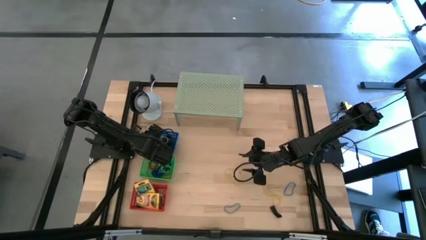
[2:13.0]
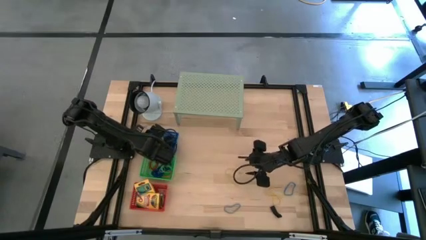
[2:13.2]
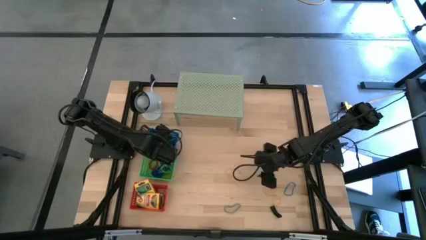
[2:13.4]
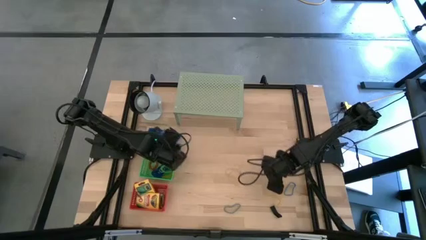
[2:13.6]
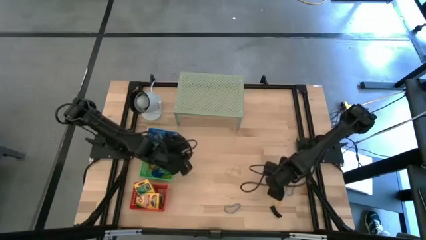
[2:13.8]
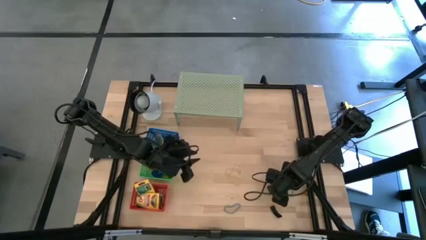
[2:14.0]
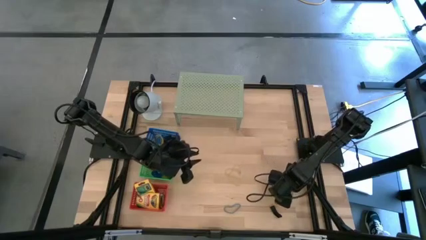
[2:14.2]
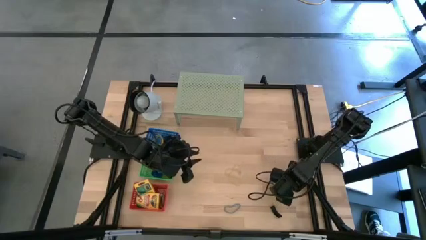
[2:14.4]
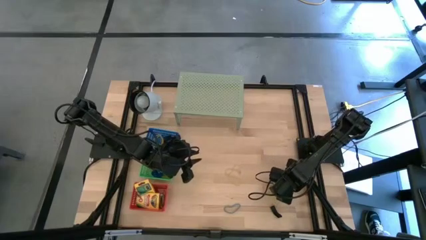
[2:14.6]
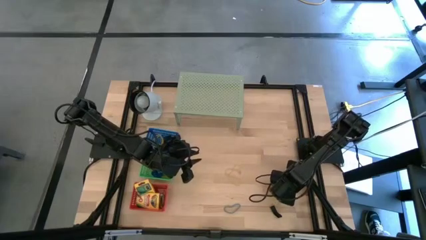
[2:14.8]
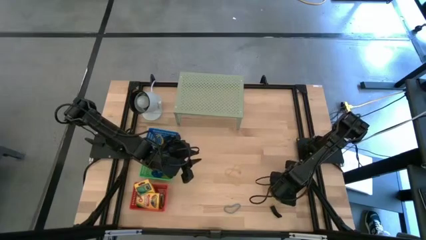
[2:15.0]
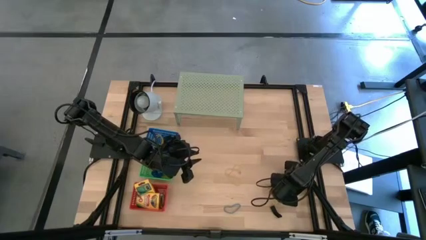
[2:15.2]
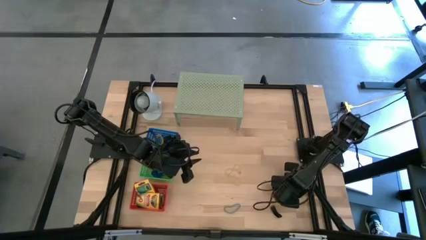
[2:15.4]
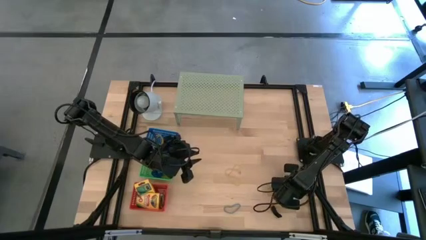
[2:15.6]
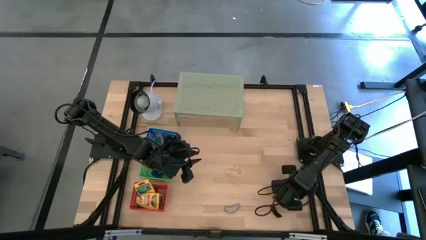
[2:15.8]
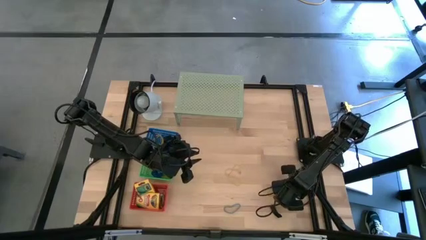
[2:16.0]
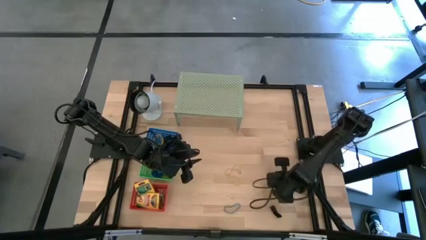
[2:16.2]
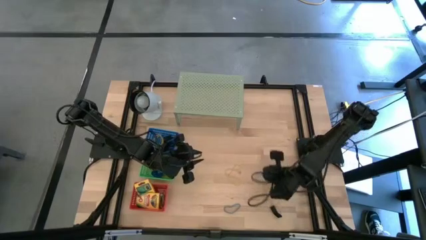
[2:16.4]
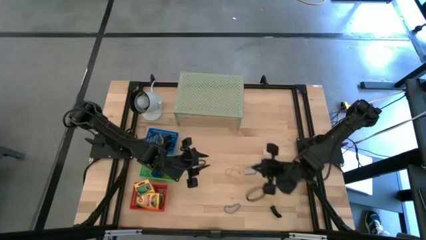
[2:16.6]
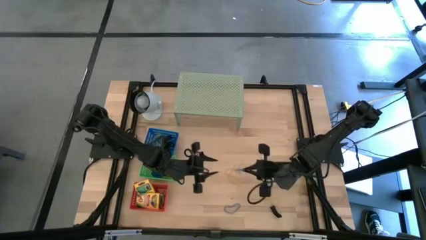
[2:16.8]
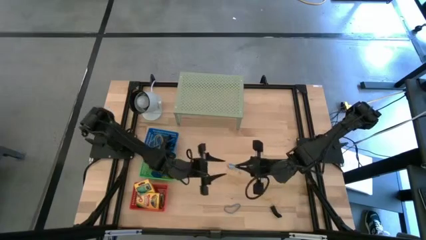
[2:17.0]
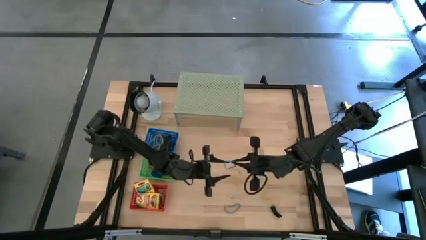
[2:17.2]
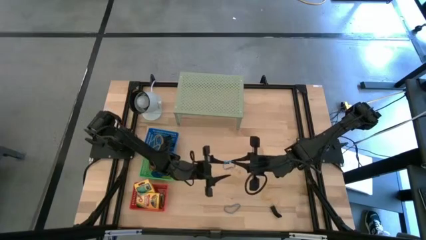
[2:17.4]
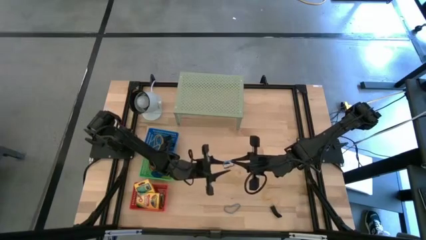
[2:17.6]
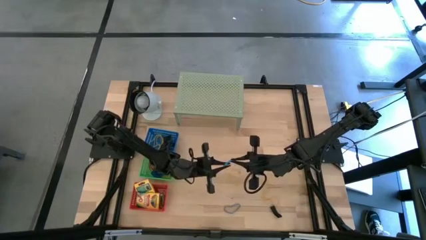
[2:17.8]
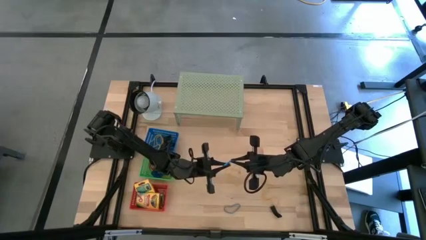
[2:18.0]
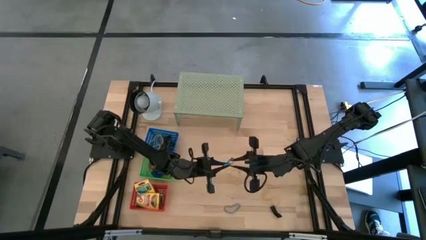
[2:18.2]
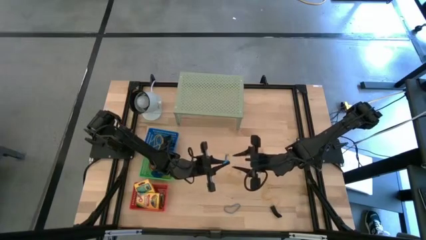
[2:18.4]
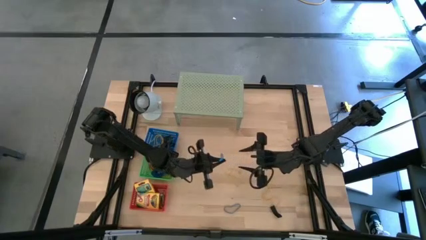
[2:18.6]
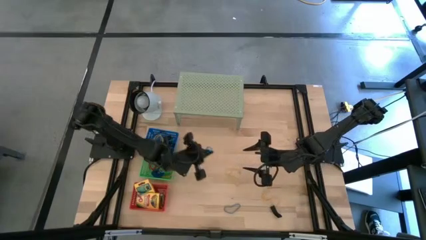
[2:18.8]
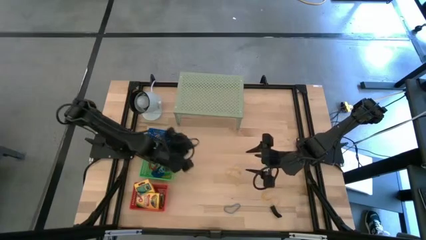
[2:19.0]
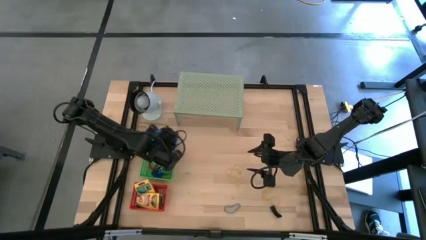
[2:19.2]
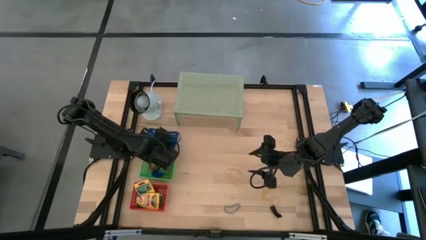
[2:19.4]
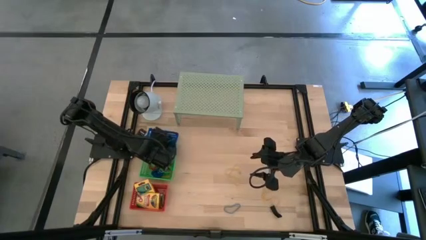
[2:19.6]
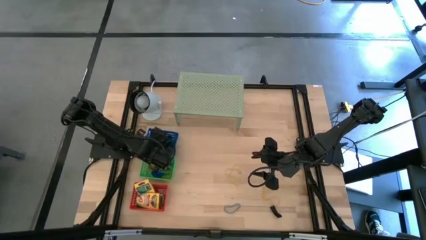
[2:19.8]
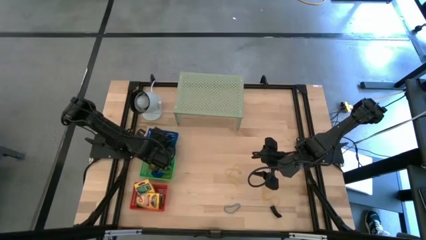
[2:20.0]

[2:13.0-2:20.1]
Task: Pick & Place Office Desk Supplies
Put the blue rubber band into the blue bin

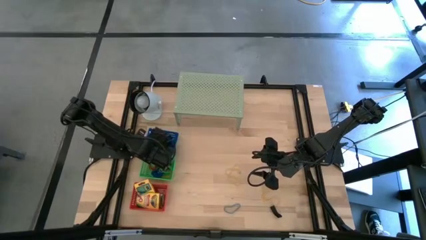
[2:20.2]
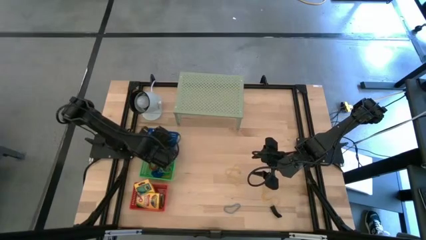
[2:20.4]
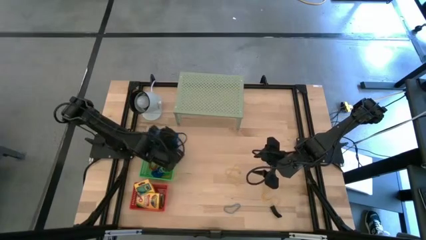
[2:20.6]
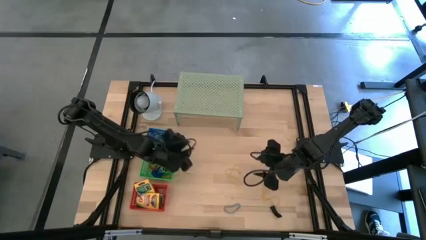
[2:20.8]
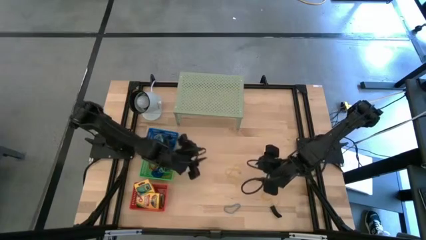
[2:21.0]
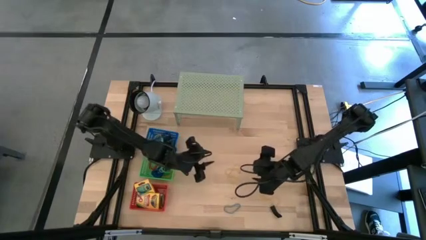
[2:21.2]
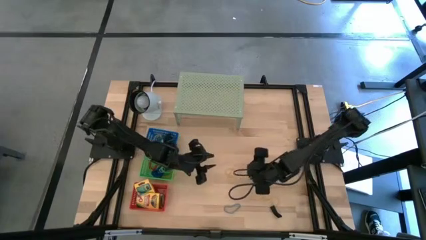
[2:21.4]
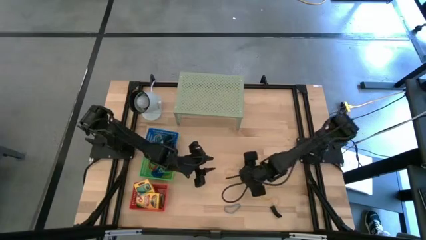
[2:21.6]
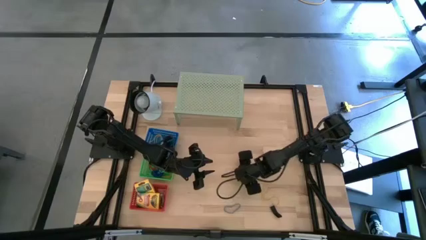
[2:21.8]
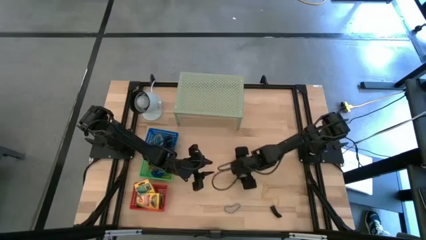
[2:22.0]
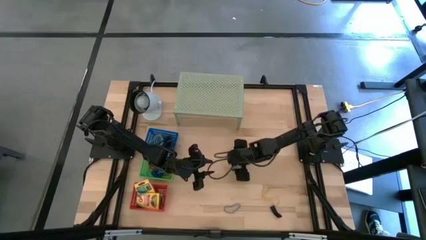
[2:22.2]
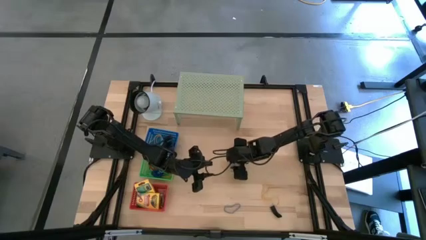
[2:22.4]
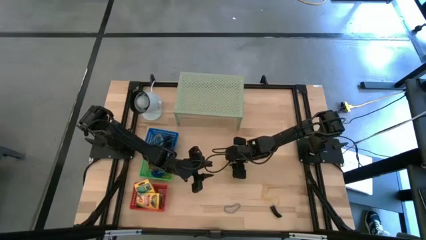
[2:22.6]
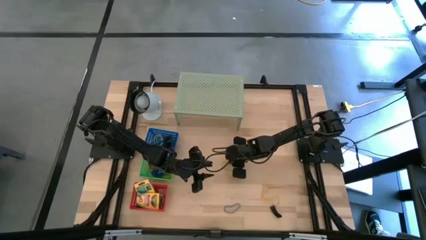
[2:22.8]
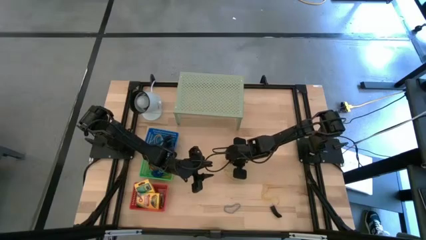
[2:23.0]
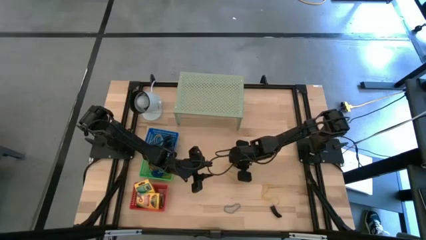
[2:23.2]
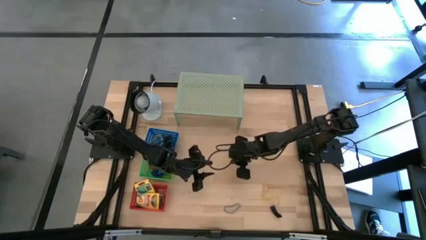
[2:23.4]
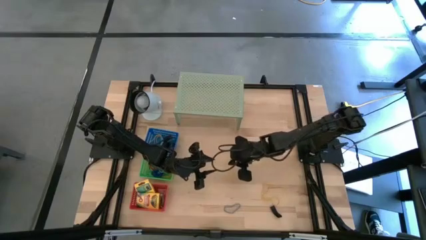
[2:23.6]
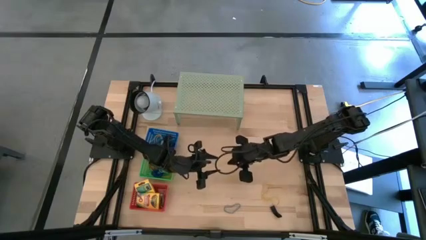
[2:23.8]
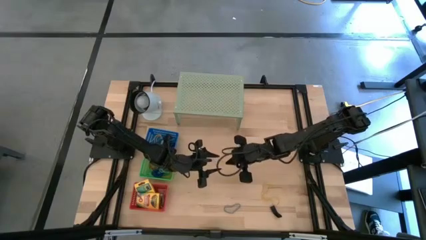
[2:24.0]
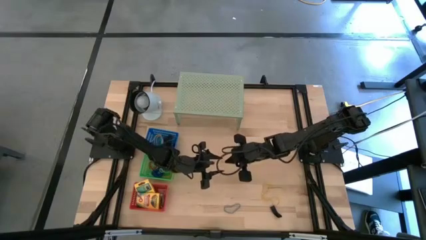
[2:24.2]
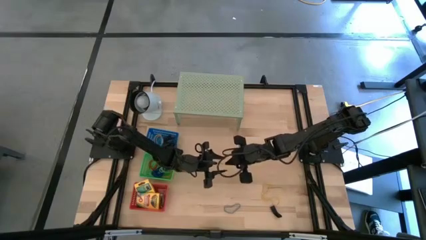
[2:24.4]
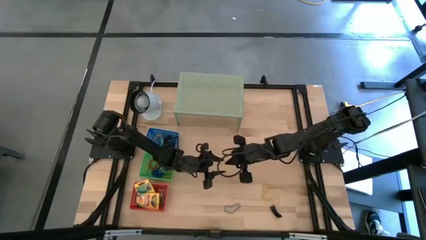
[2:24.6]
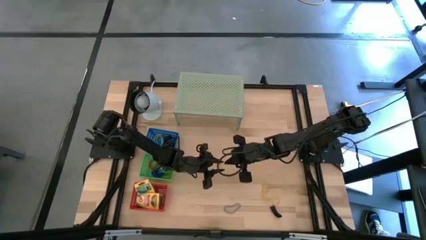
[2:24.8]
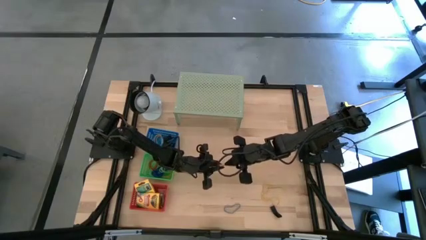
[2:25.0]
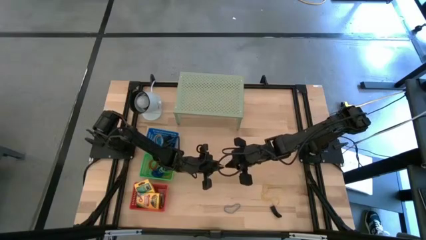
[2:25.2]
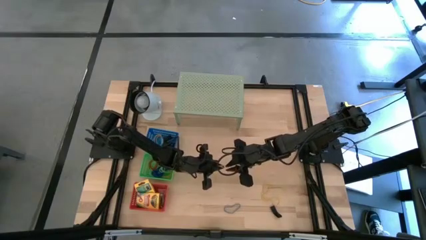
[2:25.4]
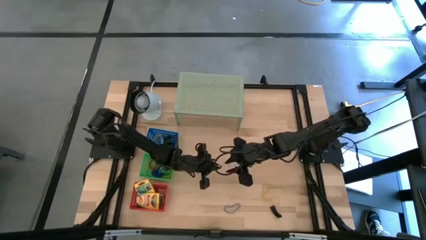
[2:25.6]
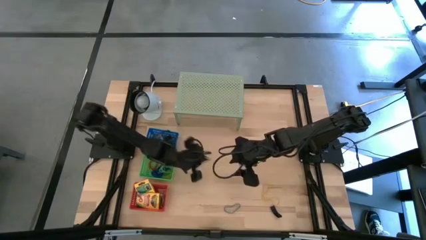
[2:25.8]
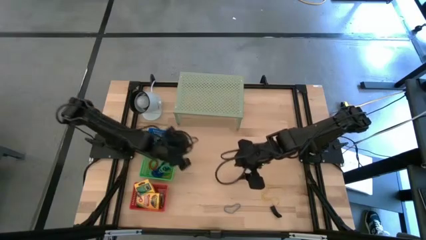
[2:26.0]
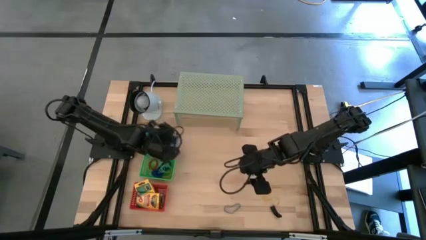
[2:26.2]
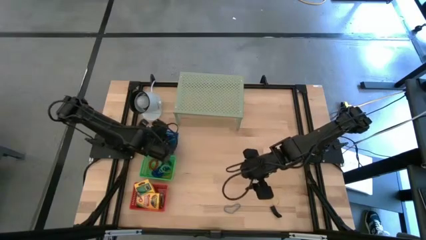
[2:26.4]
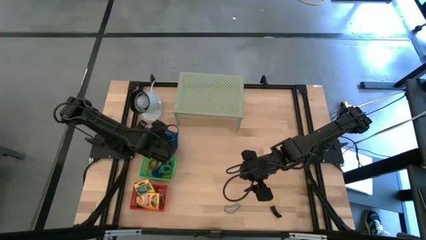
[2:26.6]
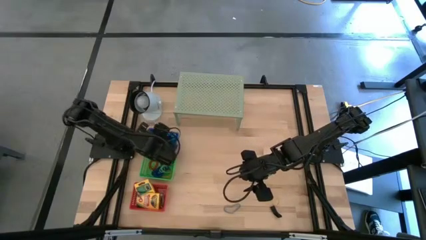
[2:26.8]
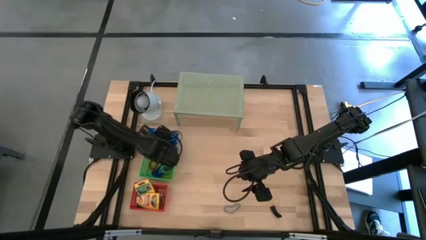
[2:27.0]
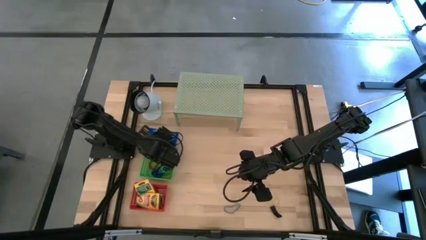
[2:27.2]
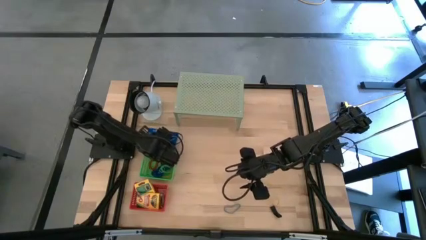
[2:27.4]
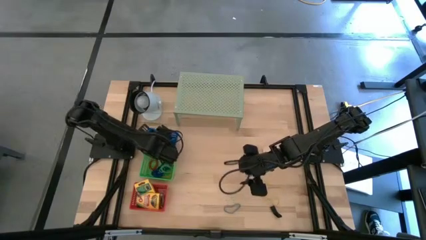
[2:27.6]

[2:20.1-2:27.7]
Put the yellow rubber band into the blue bin

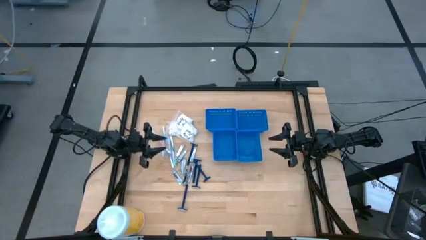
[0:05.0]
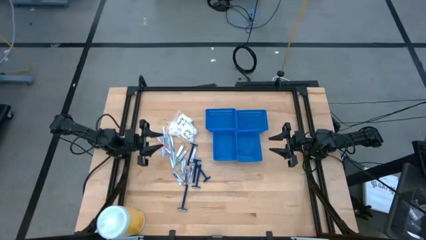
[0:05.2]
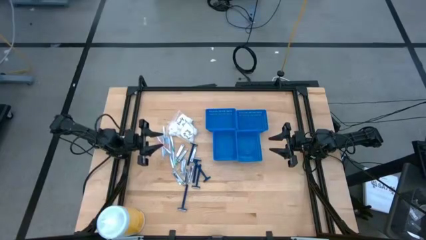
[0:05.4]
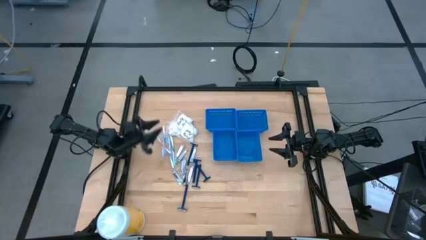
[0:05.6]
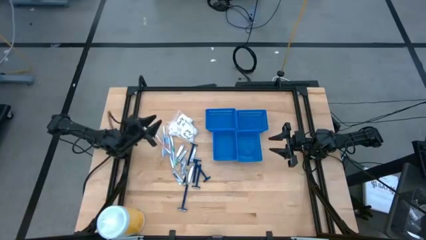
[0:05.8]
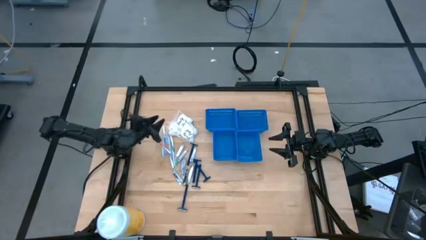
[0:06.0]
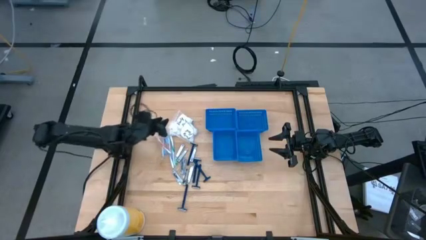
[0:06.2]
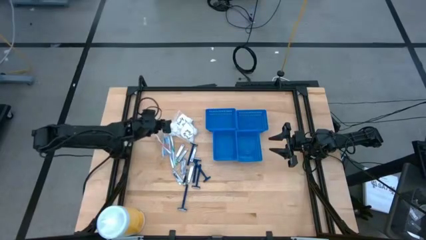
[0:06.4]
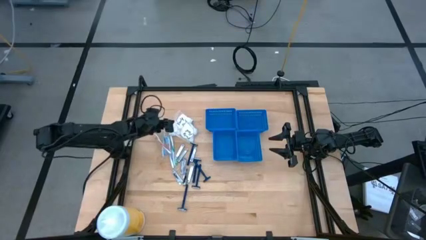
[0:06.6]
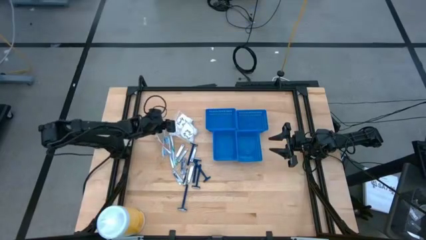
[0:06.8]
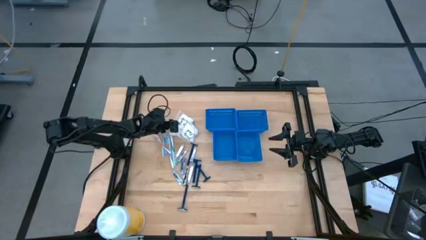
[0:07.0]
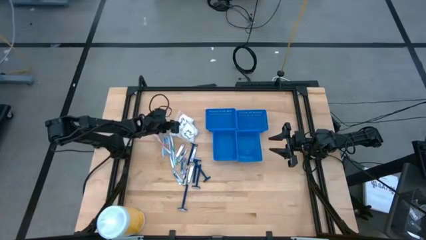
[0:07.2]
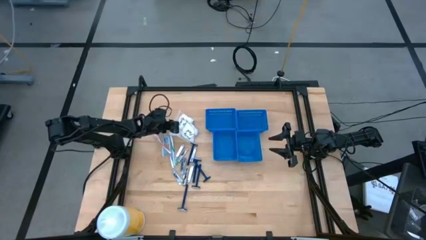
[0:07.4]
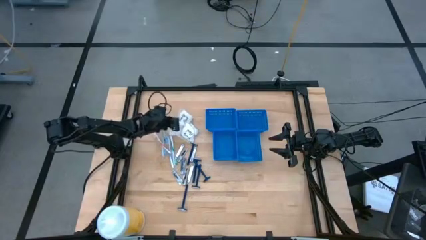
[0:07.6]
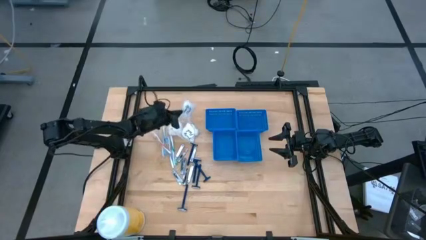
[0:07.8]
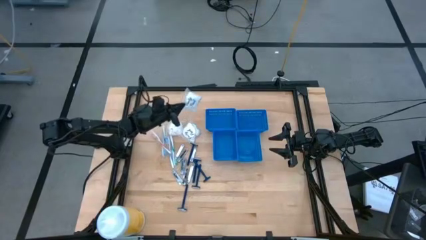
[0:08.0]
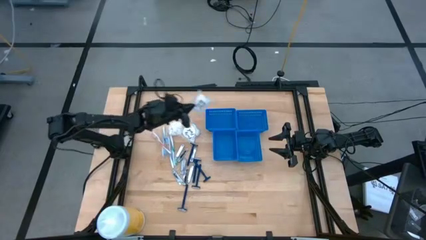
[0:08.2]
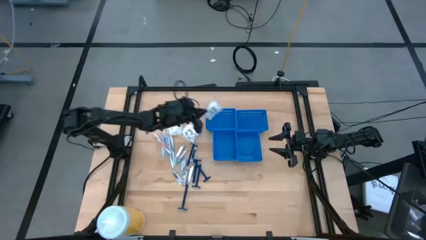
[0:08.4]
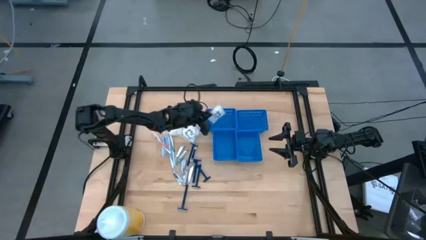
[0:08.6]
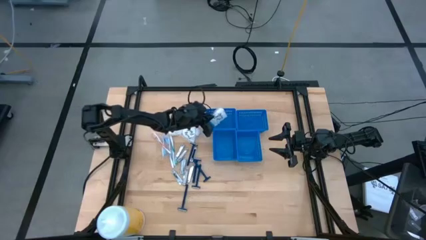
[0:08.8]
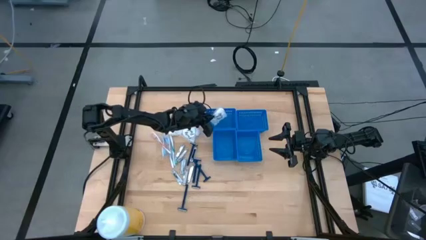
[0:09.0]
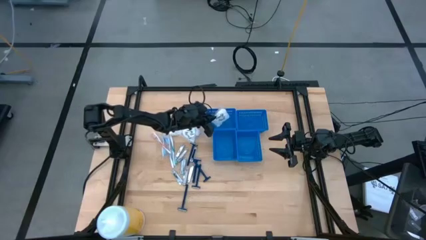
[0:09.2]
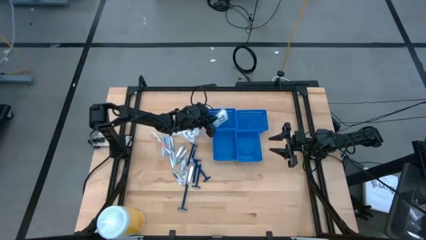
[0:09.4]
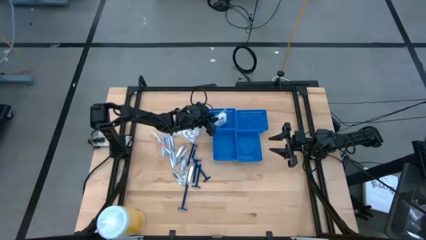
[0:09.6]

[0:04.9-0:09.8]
Task: Pick & Place Travel size toiletries
Put the transparent cotton pack into the top left blue basket
